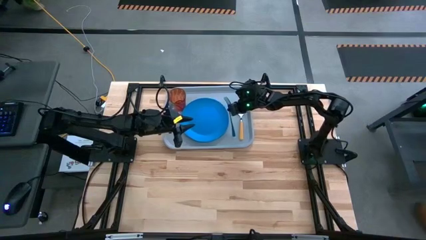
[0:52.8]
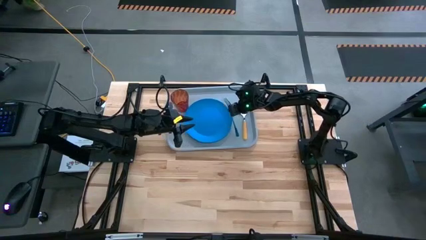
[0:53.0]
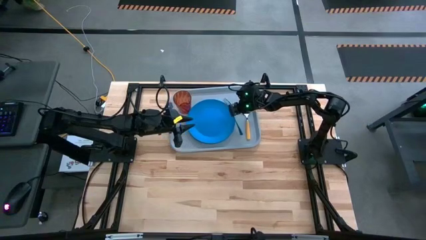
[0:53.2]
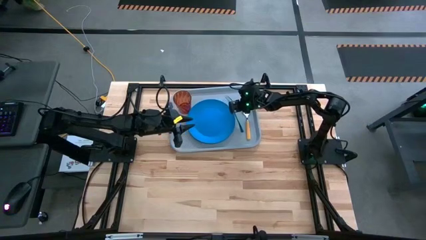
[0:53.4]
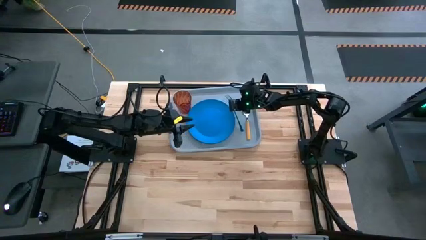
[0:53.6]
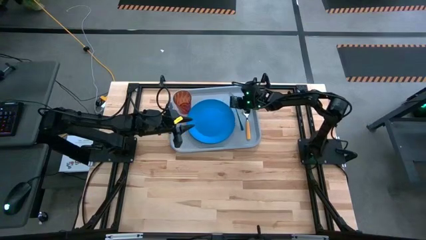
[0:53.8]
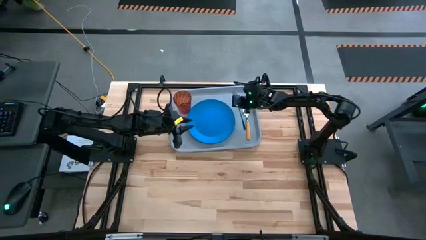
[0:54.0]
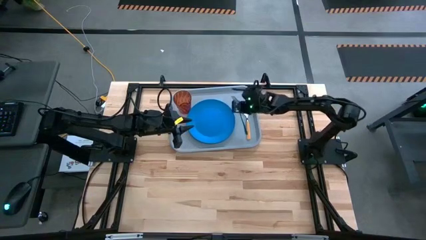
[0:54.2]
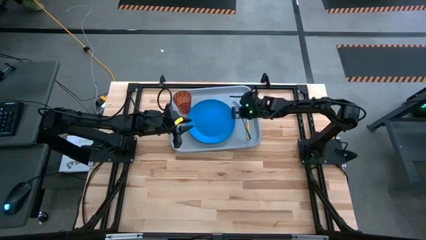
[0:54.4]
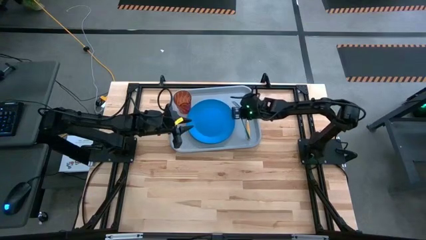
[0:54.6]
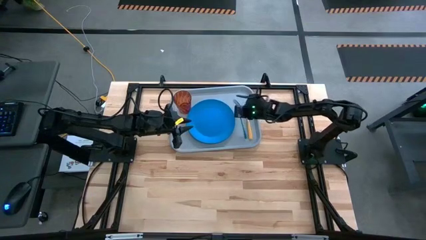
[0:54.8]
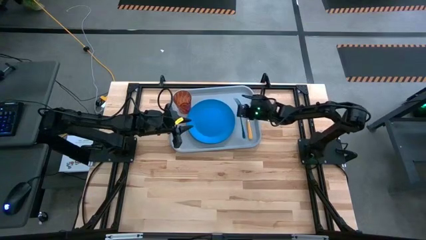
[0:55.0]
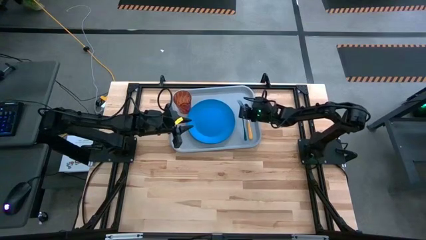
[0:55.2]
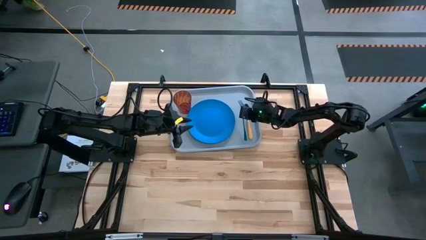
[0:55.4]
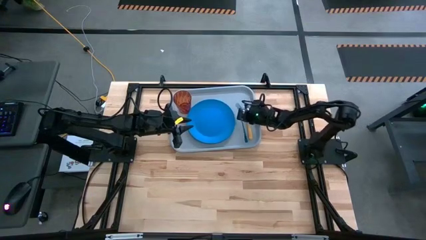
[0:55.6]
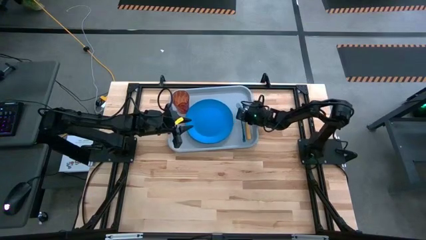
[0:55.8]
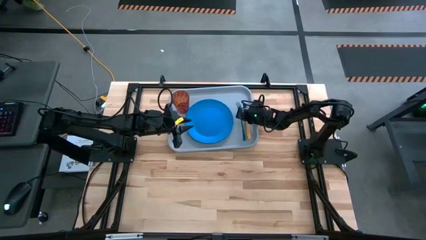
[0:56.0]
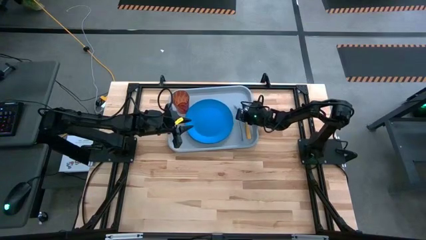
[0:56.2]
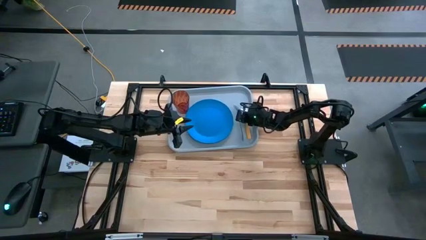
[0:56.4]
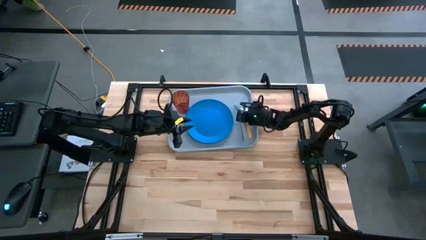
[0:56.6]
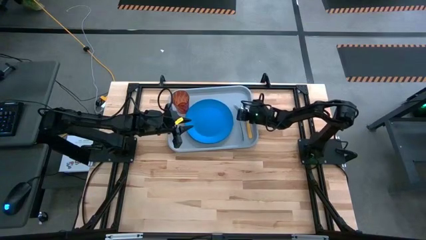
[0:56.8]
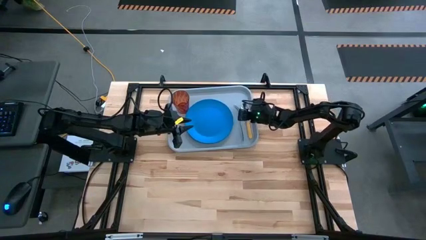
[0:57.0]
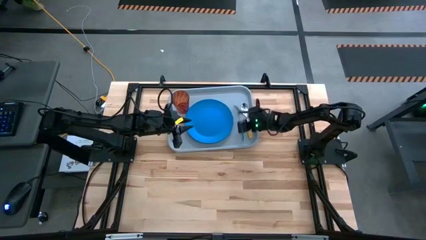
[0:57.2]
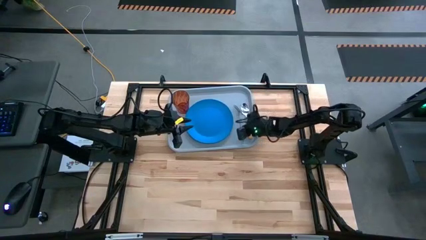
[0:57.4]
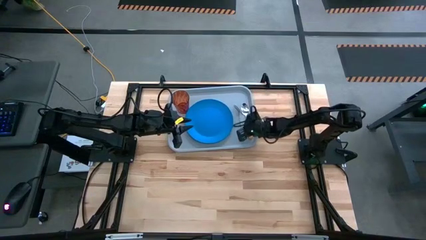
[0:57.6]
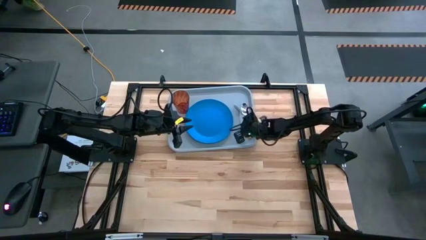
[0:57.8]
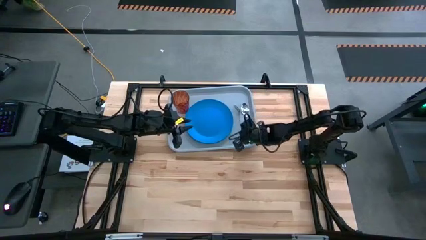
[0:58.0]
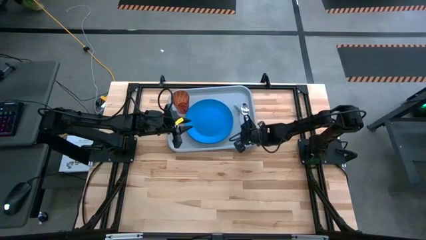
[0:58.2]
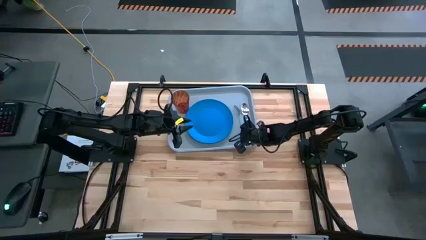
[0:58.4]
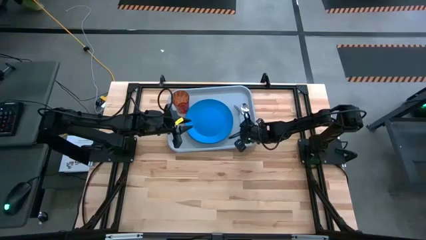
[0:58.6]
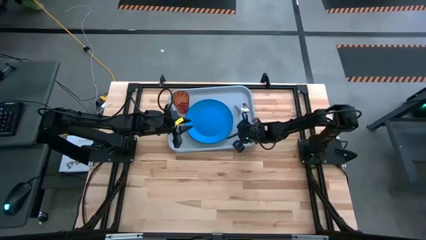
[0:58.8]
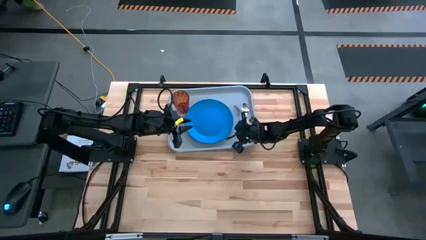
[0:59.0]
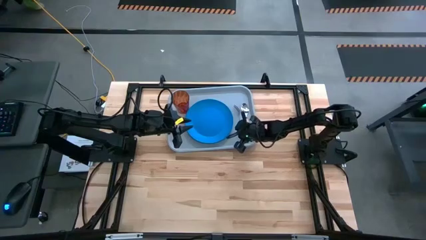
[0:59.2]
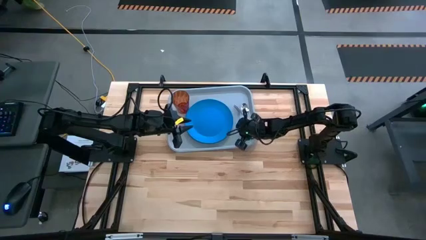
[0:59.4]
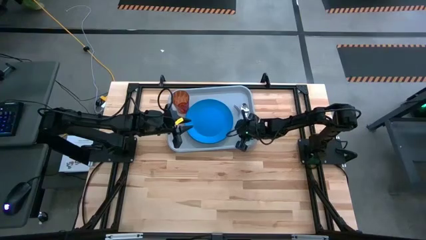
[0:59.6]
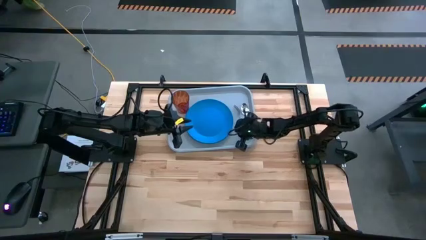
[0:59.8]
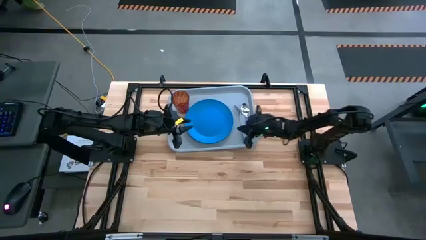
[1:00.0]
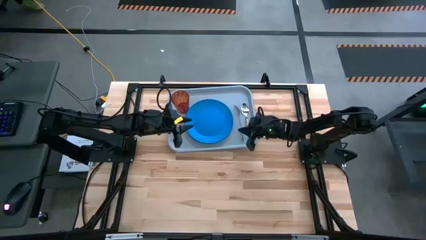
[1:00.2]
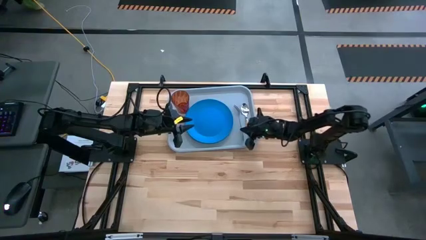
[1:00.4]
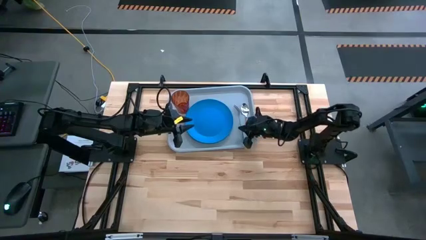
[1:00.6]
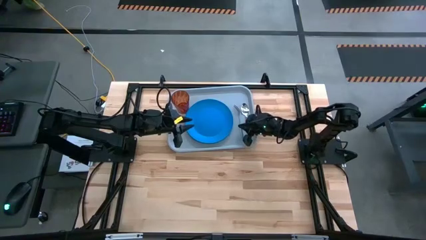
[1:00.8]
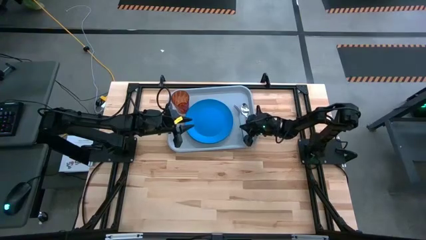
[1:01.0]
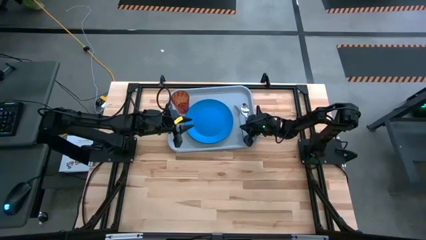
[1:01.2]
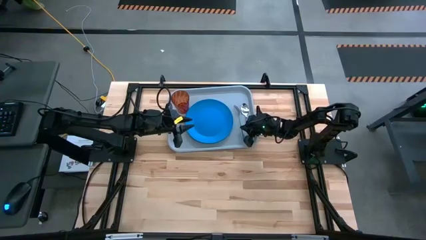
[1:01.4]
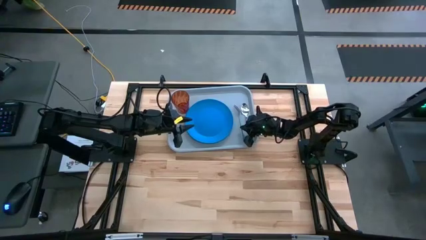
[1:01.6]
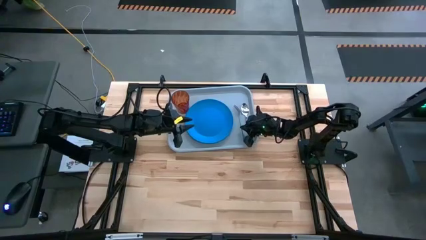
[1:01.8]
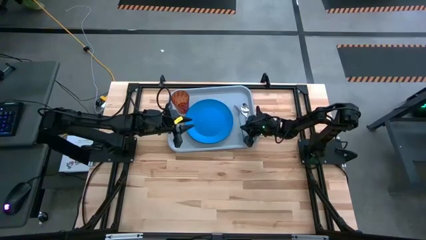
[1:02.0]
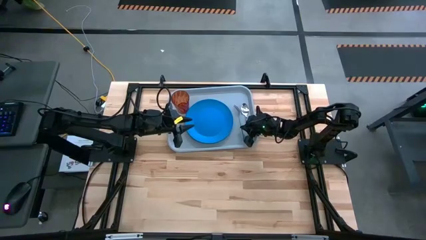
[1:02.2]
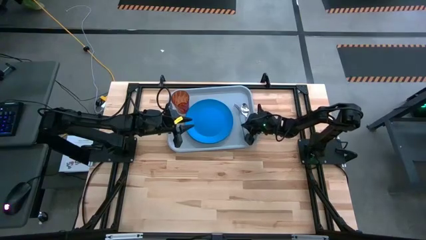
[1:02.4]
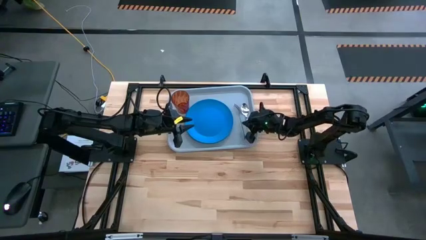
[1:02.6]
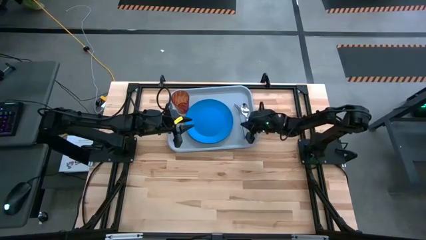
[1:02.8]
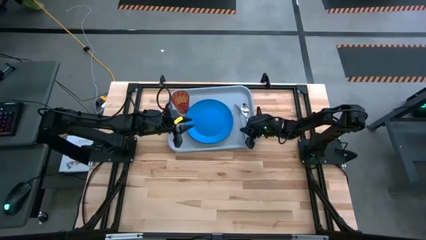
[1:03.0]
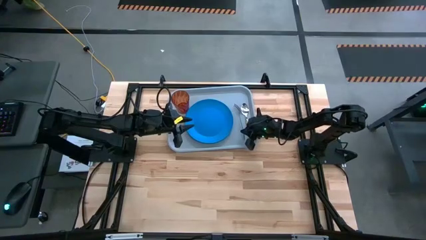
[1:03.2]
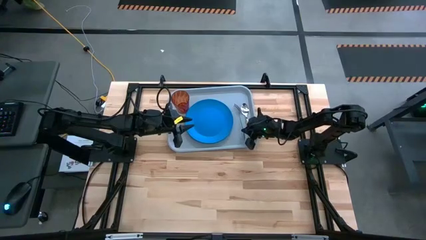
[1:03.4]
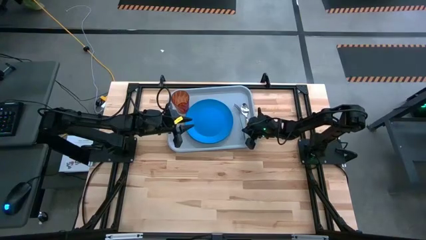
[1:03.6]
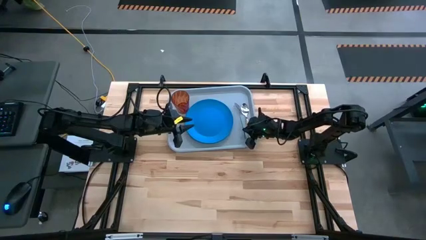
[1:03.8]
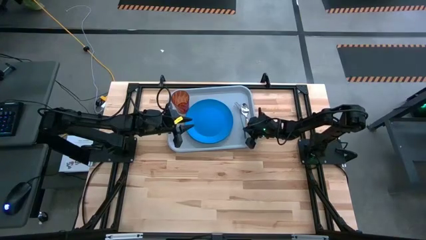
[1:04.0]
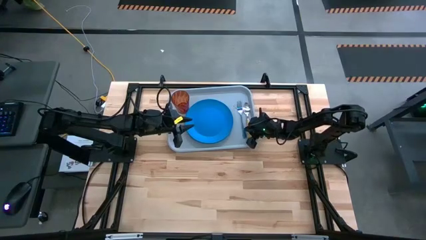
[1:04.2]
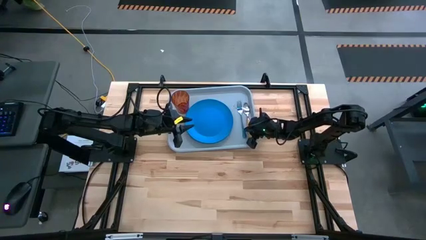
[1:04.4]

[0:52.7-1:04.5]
Task: Pick and place plate/cup/fork/spoon on tray
Put the blue fork on the gray serving tray to the right of the blue plate

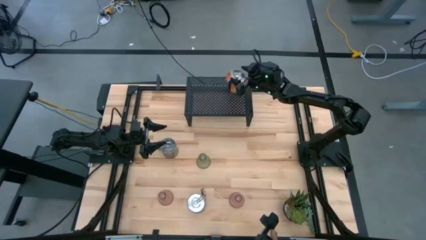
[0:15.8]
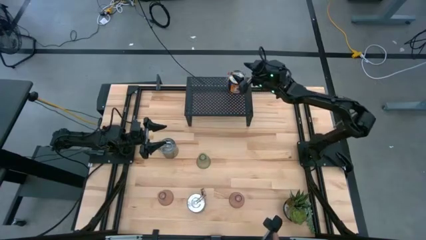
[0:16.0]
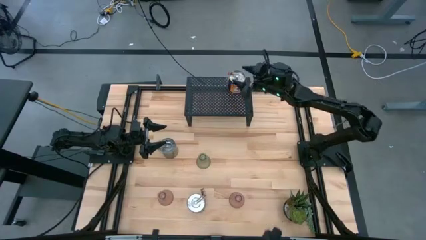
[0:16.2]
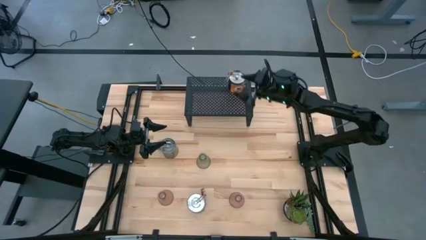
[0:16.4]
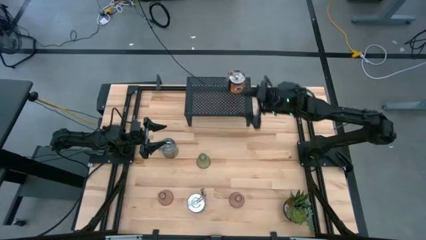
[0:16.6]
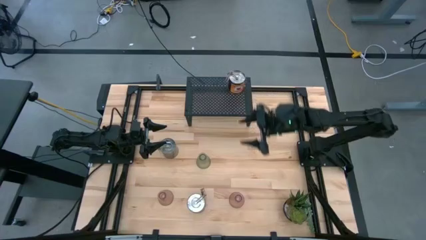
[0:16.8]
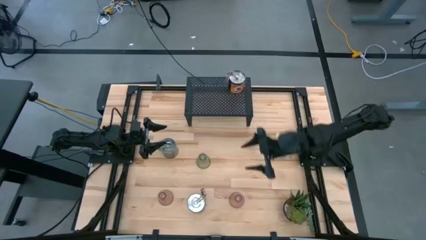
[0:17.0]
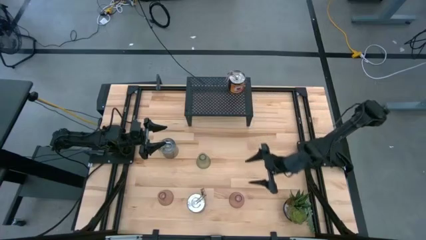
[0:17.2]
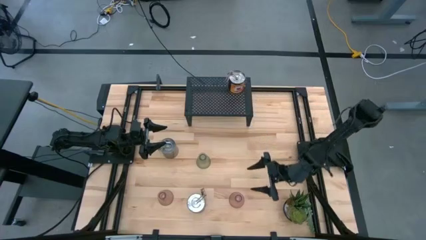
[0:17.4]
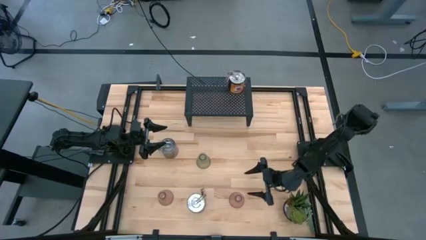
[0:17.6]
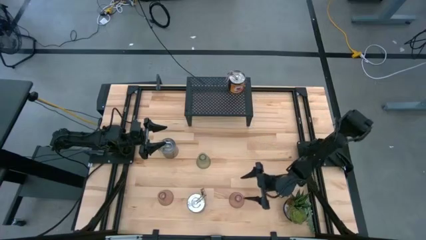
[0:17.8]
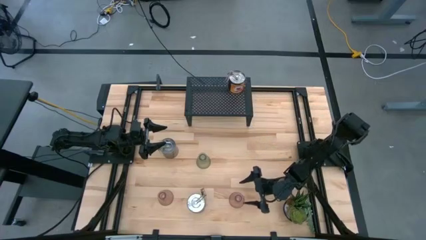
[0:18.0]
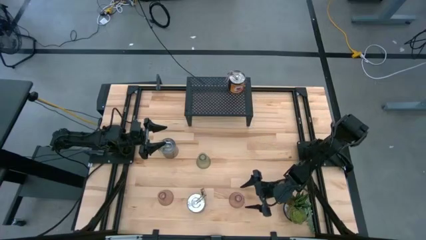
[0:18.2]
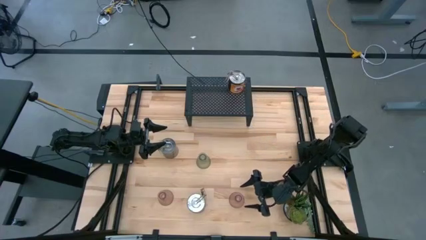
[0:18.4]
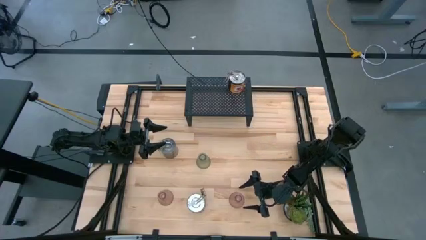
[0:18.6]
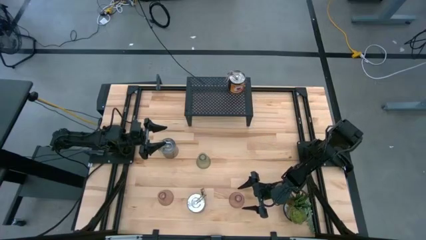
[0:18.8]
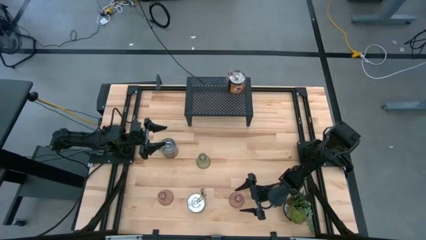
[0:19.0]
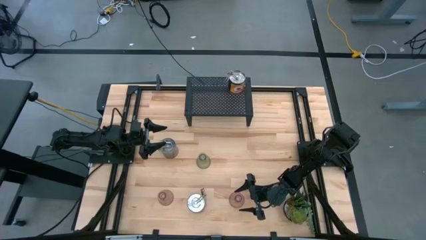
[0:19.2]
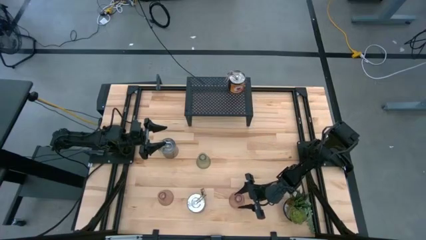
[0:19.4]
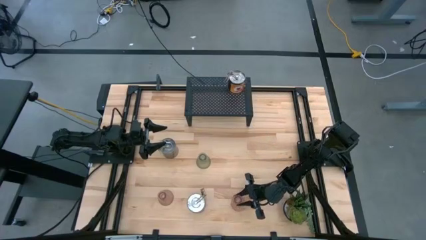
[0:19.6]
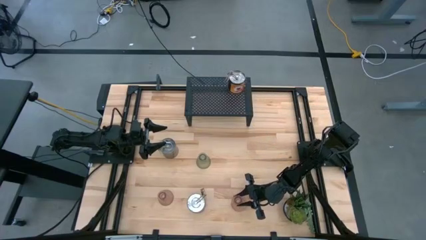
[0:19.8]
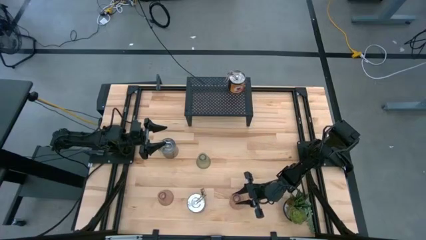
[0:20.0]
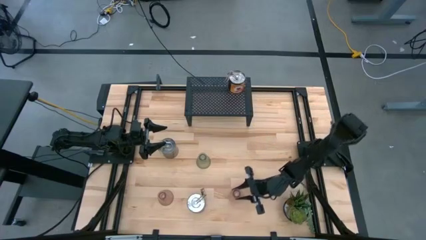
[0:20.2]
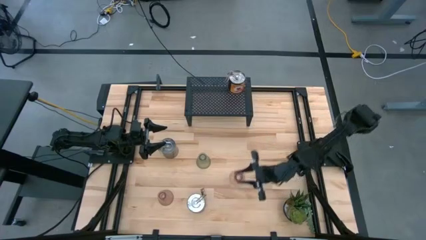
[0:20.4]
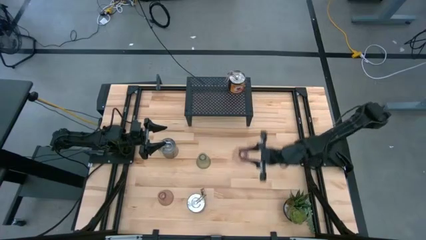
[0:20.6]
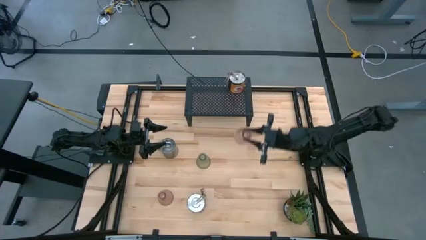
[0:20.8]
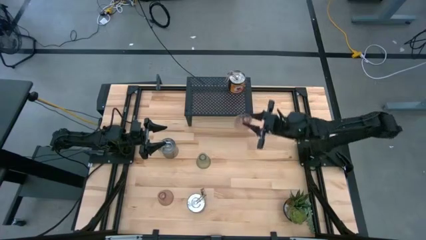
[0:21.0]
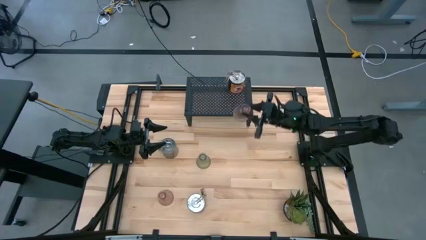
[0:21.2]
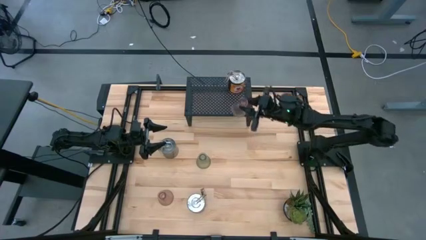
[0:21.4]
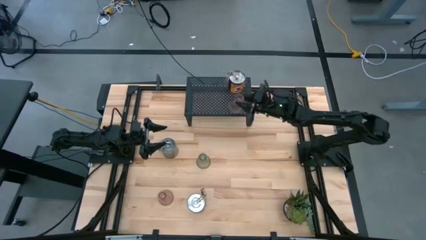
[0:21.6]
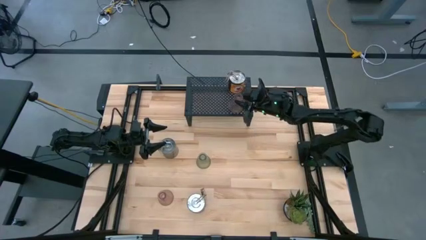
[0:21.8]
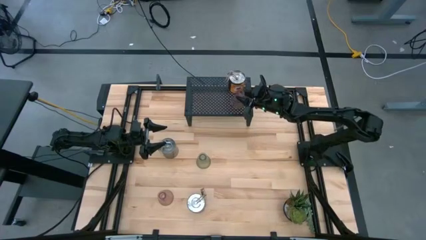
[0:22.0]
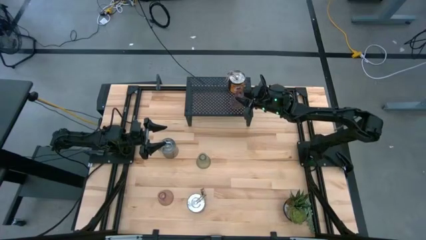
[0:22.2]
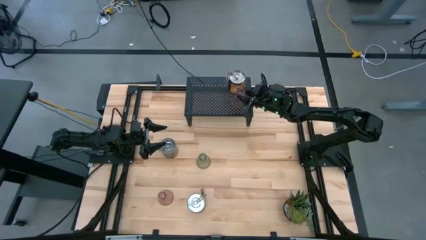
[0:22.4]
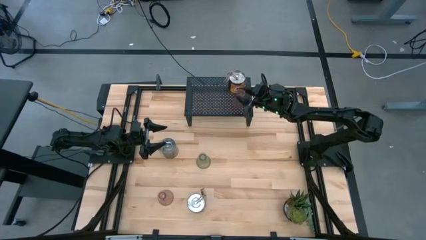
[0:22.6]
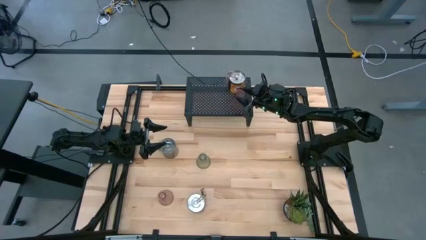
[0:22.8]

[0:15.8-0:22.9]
Task: Pick & Place candle stick holders
Put the right pink candle holder on the shelf
